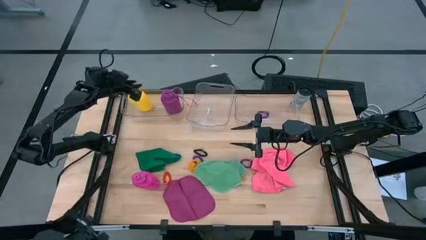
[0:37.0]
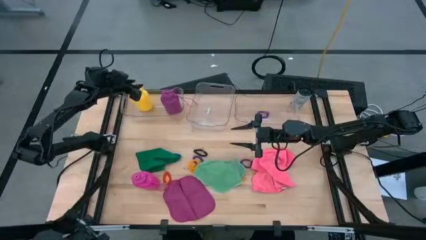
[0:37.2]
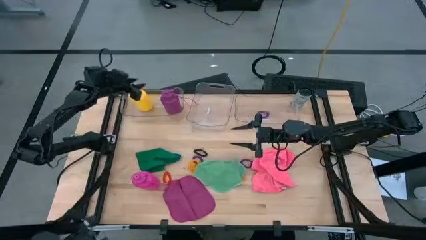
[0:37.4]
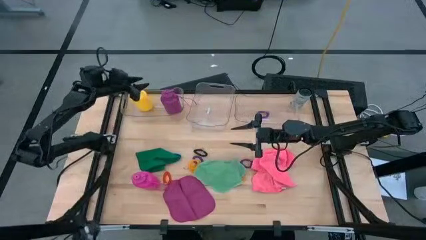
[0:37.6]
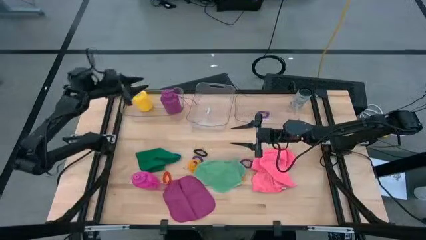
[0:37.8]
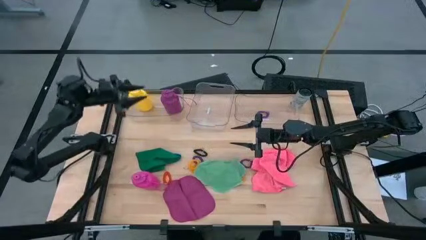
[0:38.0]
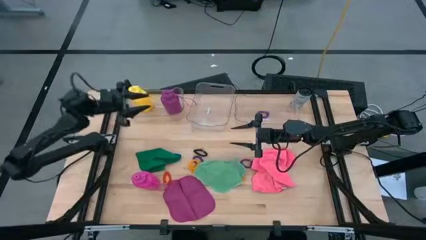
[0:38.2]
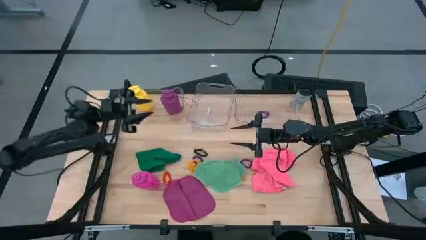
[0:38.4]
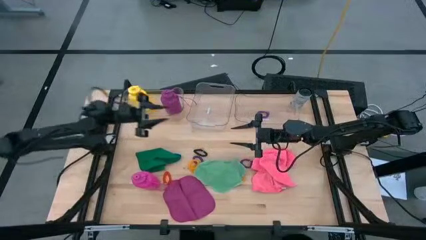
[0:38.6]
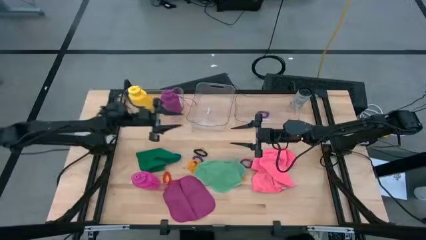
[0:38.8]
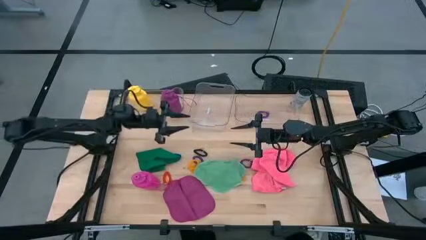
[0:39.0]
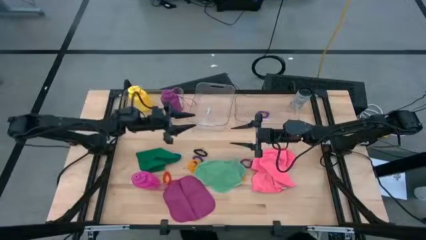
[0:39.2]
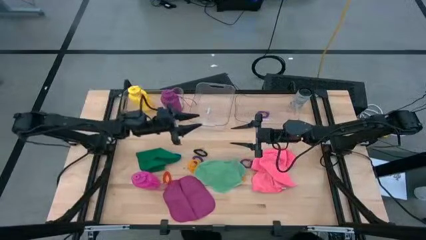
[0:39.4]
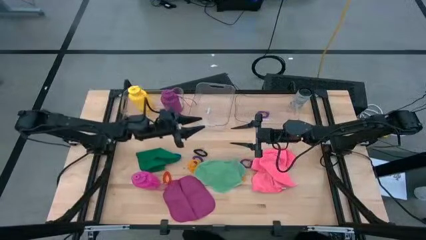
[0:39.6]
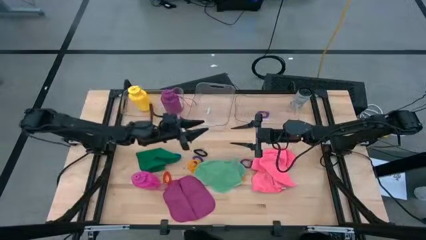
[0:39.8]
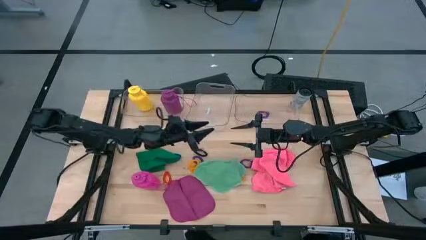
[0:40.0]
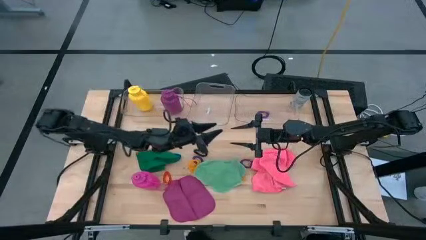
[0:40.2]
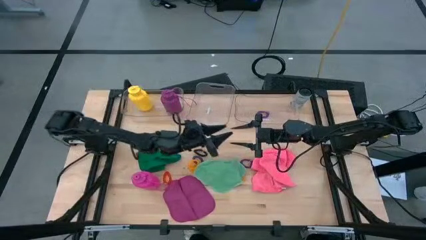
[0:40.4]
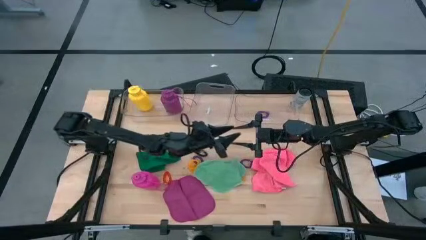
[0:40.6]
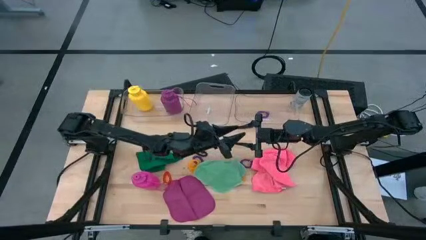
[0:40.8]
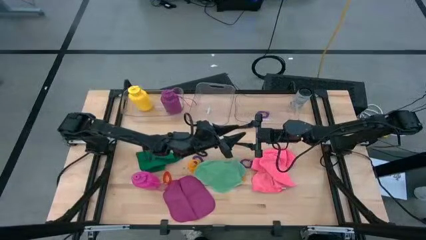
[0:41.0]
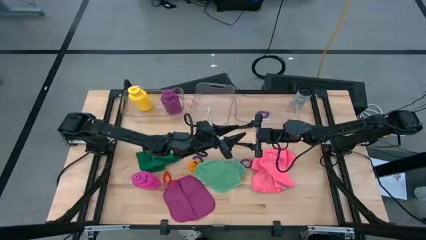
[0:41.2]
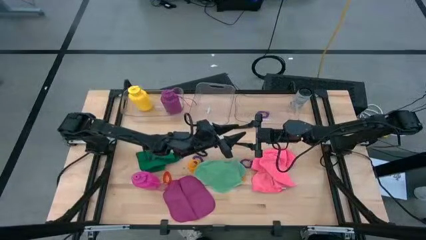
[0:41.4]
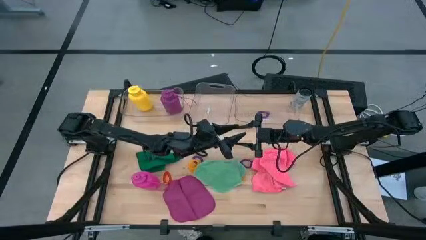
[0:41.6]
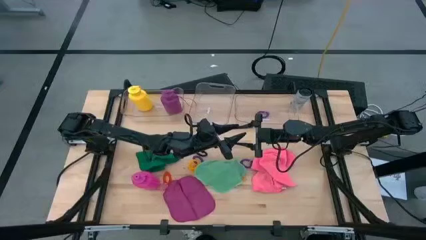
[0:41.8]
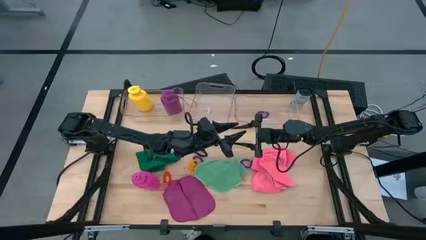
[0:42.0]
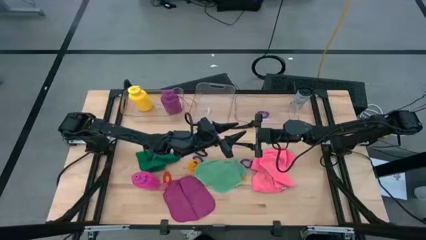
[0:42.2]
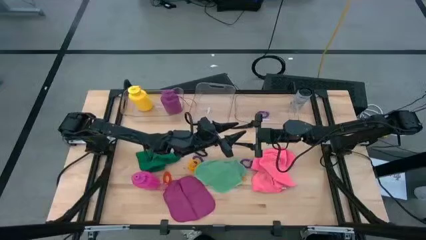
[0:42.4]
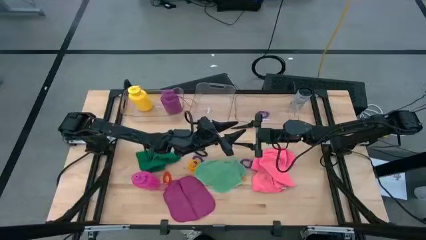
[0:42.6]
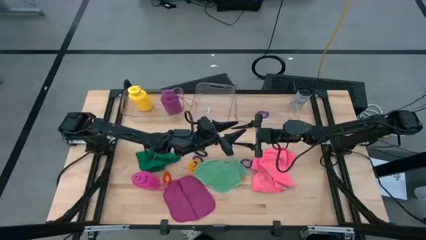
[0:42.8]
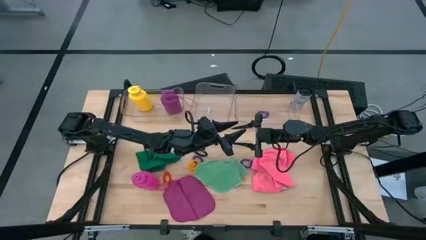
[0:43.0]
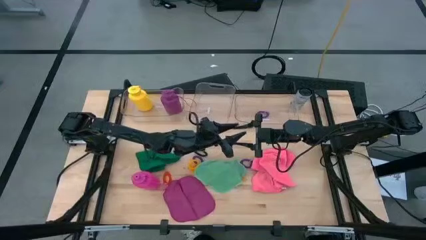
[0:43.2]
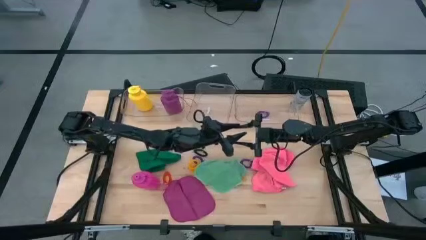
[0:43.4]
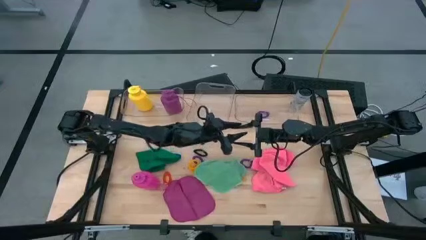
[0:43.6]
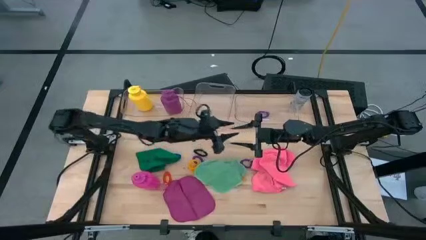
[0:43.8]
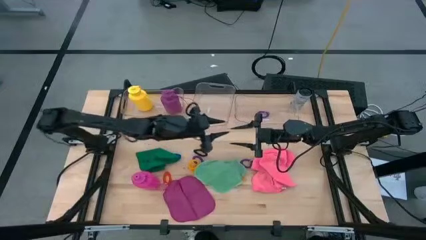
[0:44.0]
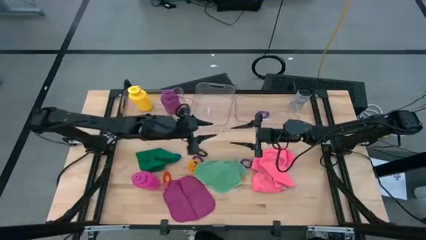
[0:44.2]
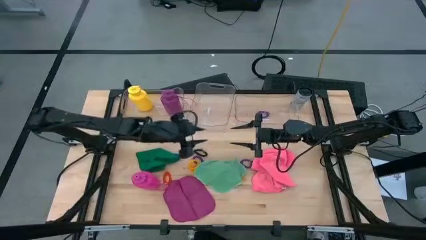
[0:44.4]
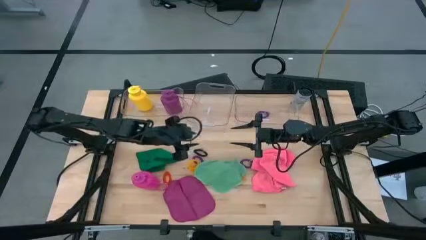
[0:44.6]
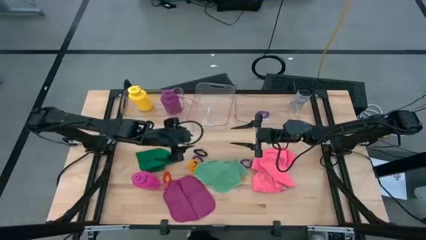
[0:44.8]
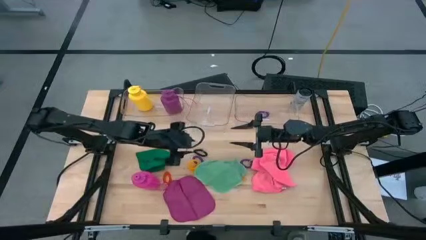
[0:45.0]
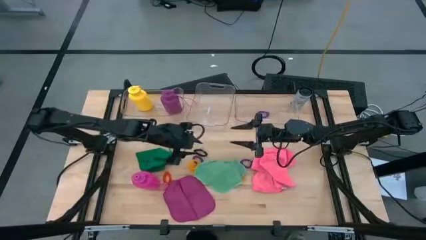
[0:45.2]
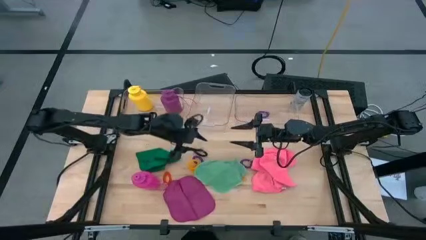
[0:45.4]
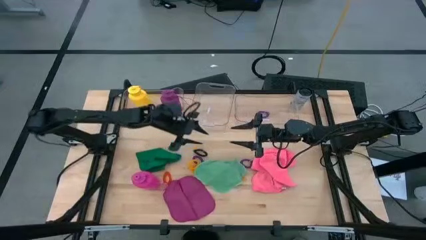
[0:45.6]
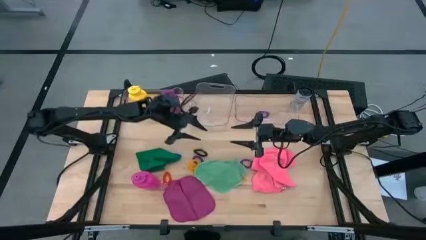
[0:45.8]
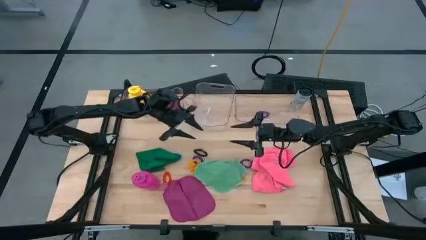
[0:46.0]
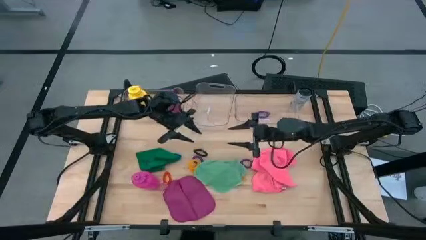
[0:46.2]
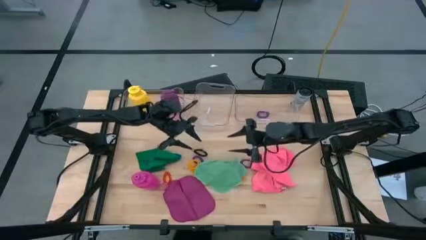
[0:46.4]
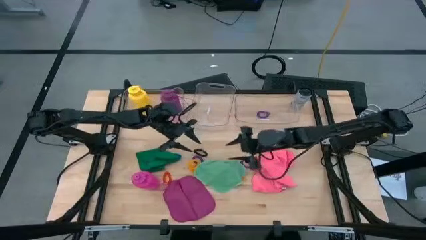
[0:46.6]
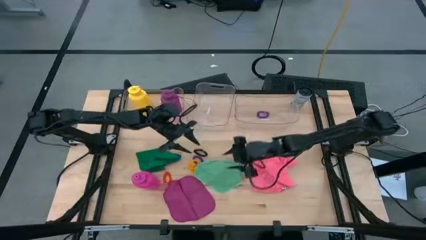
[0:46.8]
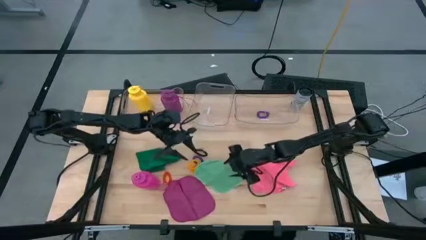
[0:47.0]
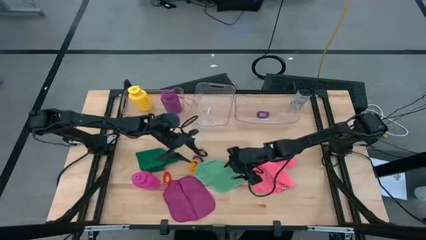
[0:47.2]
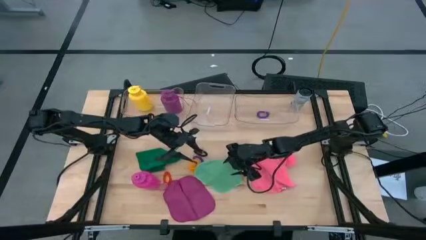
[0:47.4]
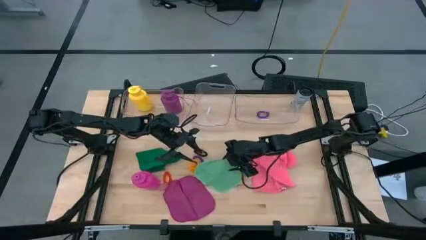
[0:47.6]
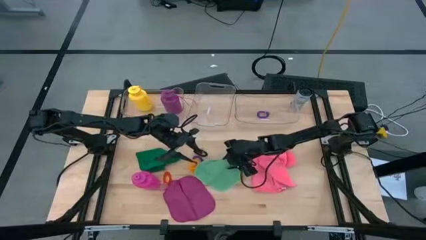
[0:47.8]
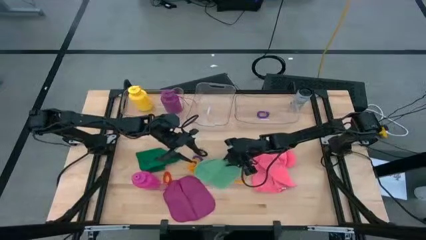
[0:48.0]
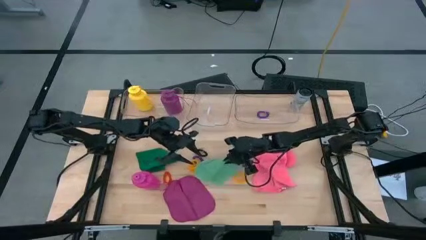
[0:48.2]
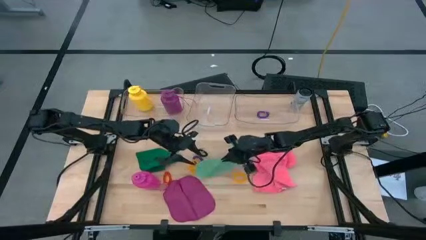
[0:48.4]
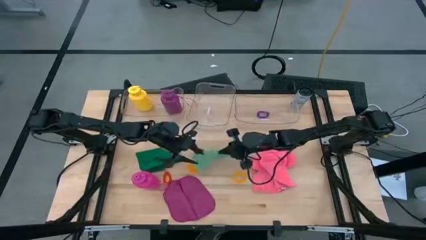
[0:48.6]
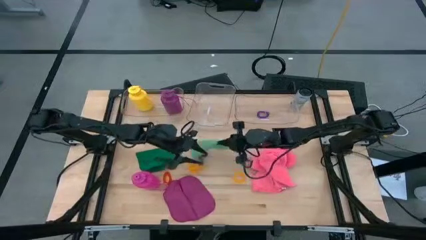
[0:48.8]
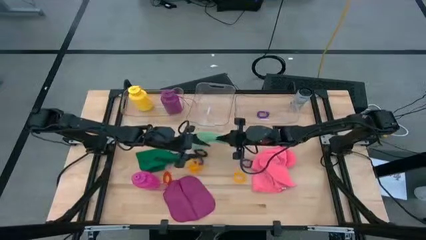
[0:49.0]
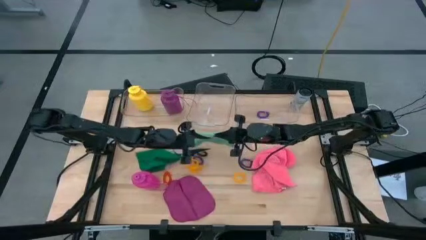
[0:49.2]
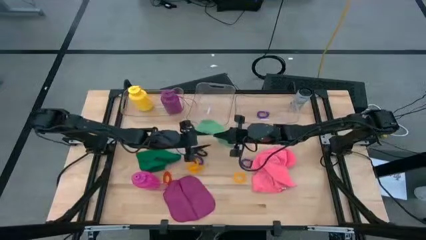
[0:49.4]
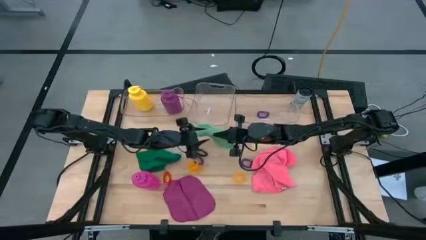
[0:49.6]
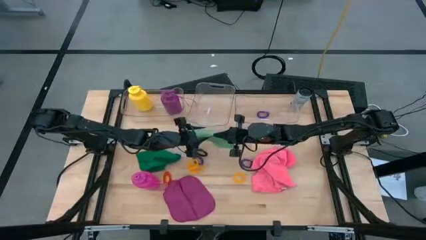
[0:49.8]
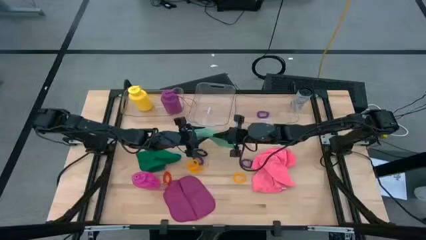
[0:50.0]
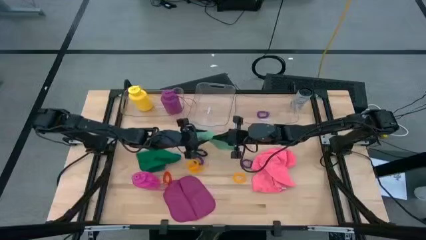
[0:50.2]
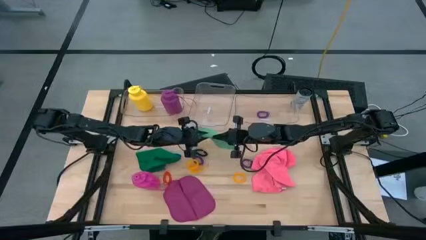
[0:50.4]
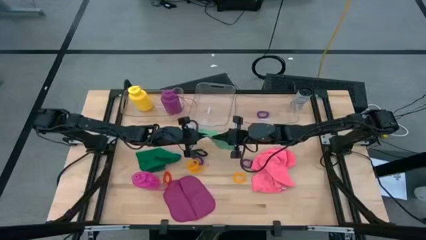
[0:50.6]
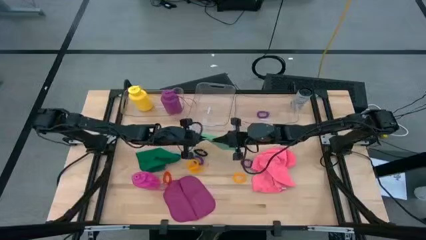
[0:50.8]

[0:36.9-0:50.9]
Task: Pick & Place Sports Items
Put the light green microfiber towel into the middle transparent bin
